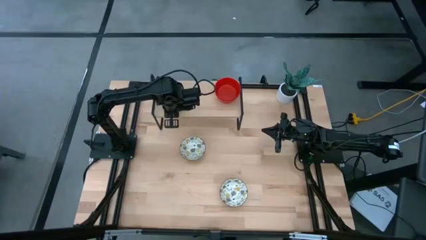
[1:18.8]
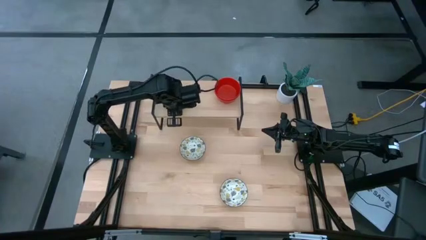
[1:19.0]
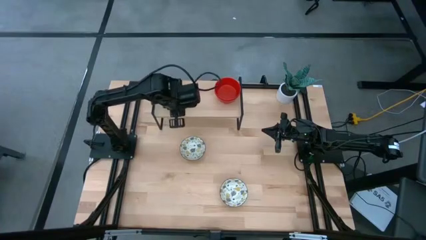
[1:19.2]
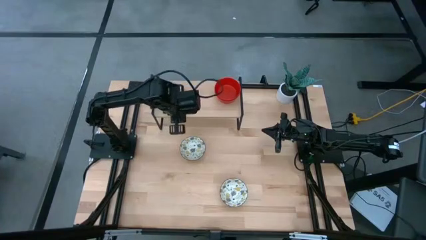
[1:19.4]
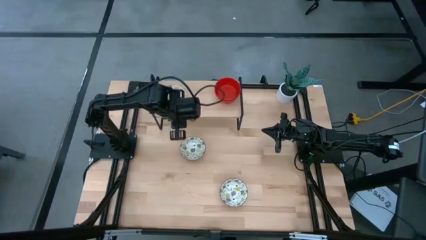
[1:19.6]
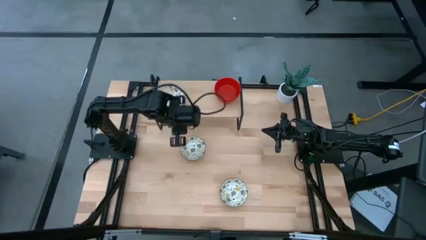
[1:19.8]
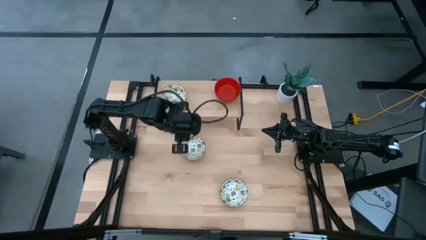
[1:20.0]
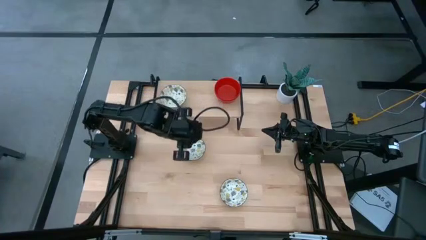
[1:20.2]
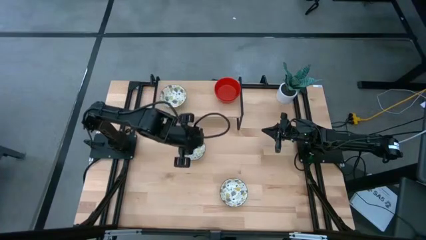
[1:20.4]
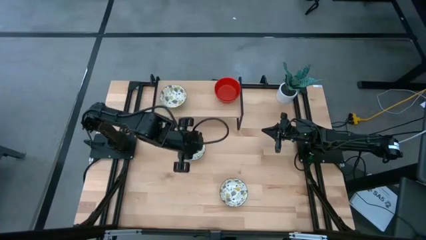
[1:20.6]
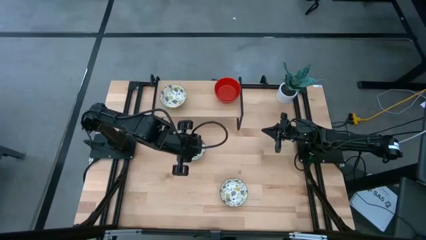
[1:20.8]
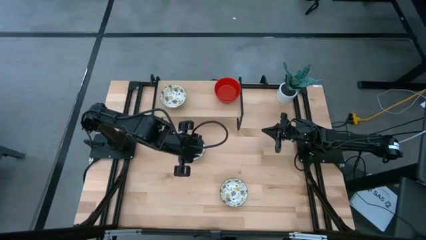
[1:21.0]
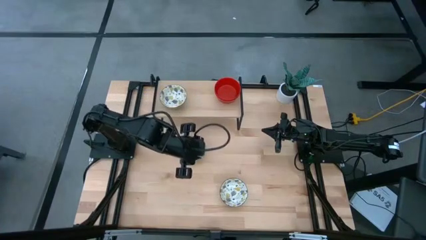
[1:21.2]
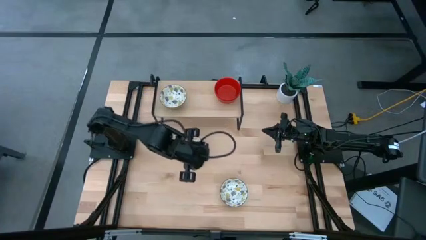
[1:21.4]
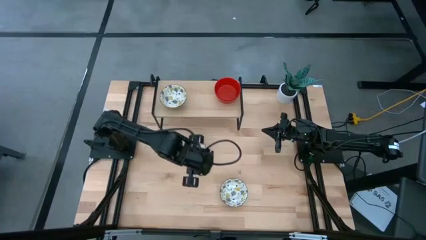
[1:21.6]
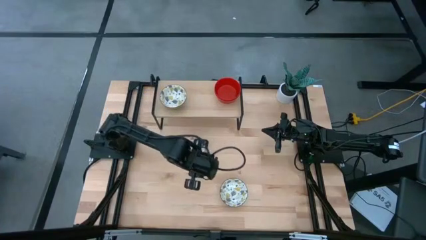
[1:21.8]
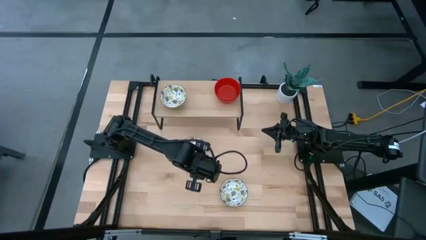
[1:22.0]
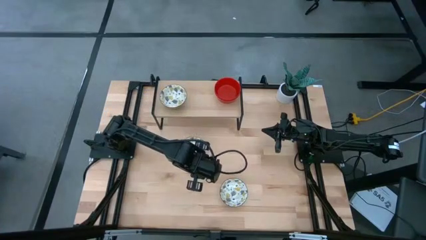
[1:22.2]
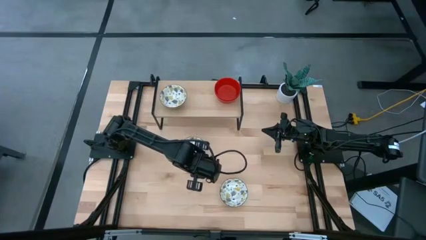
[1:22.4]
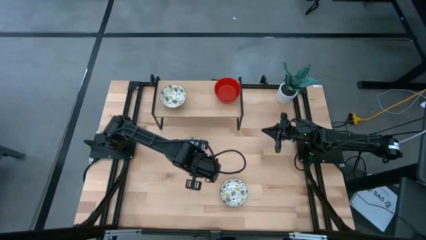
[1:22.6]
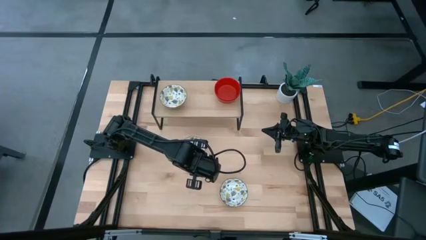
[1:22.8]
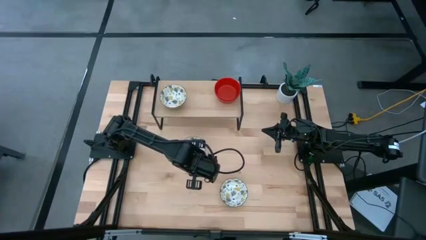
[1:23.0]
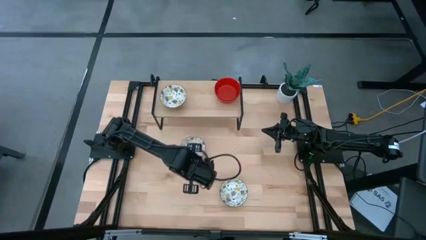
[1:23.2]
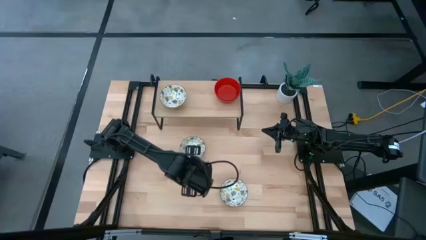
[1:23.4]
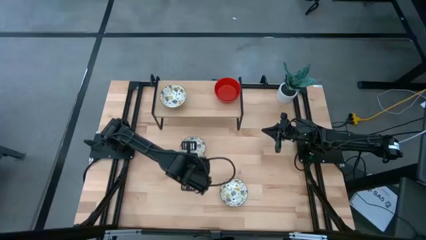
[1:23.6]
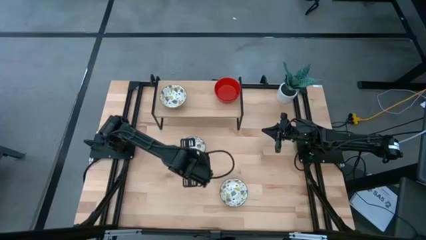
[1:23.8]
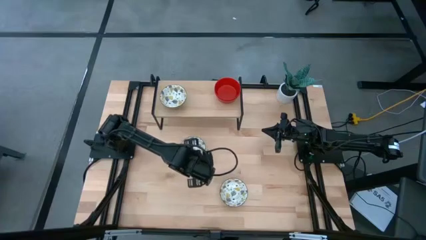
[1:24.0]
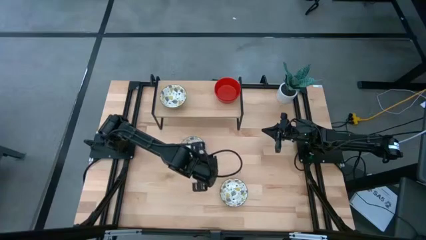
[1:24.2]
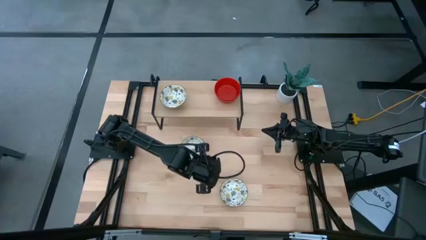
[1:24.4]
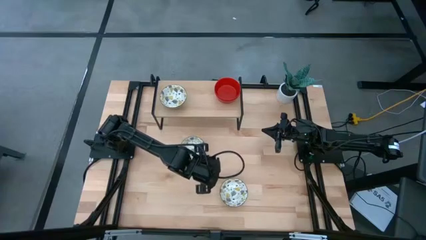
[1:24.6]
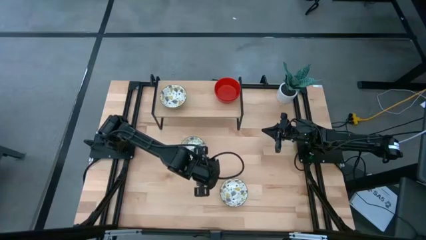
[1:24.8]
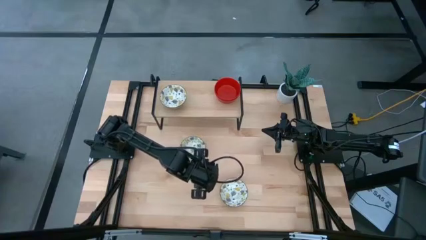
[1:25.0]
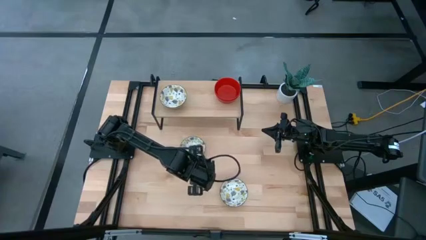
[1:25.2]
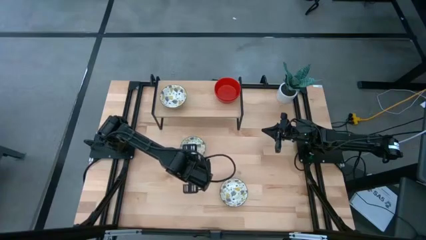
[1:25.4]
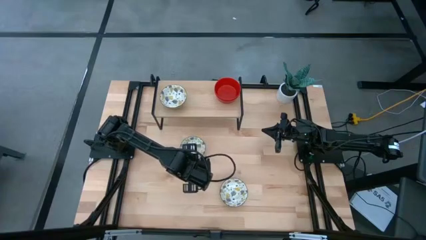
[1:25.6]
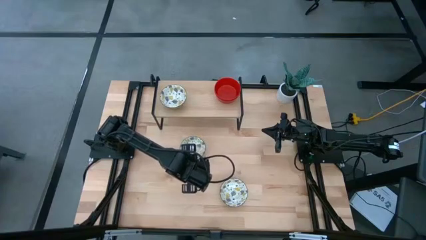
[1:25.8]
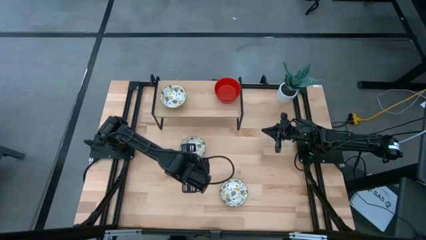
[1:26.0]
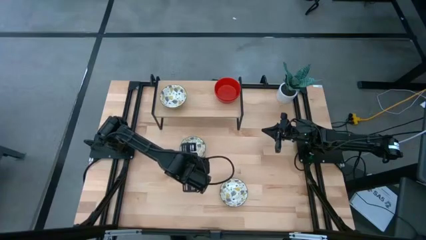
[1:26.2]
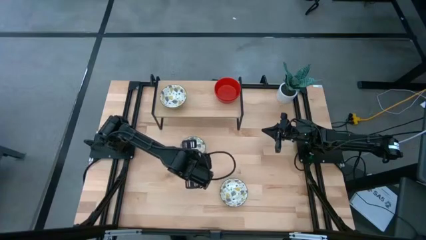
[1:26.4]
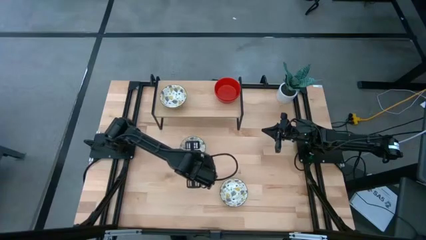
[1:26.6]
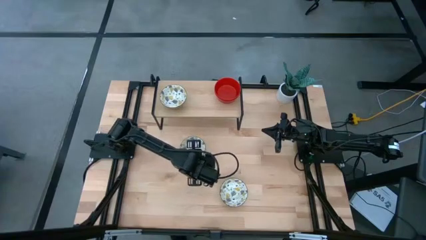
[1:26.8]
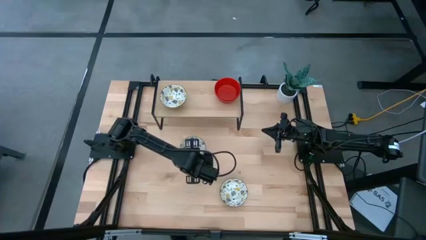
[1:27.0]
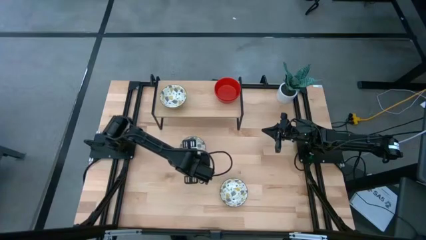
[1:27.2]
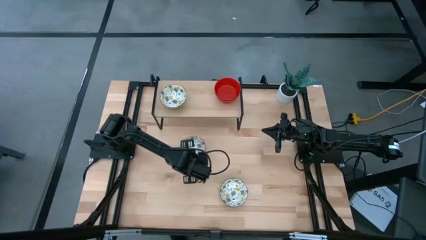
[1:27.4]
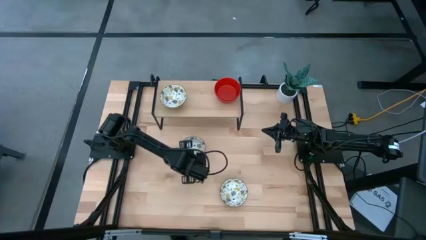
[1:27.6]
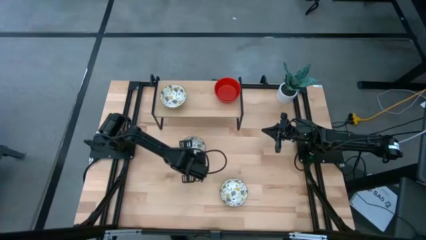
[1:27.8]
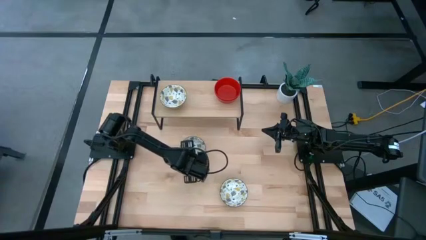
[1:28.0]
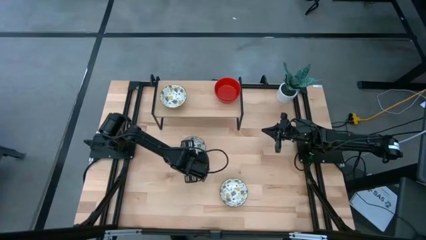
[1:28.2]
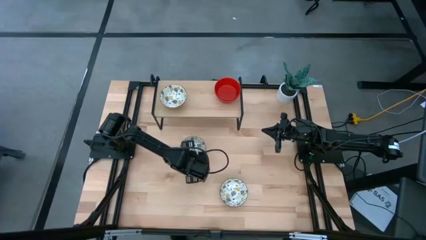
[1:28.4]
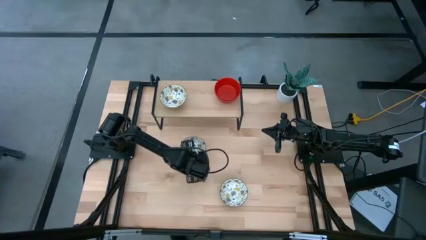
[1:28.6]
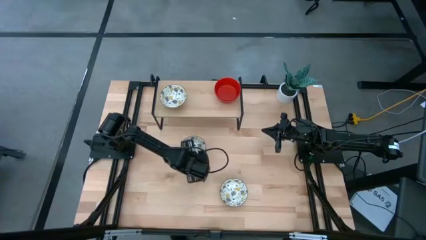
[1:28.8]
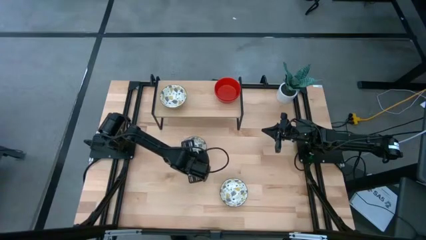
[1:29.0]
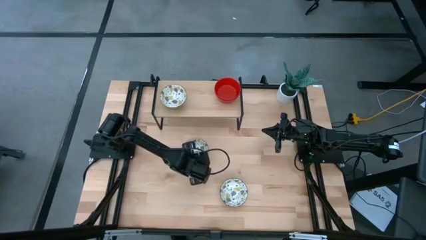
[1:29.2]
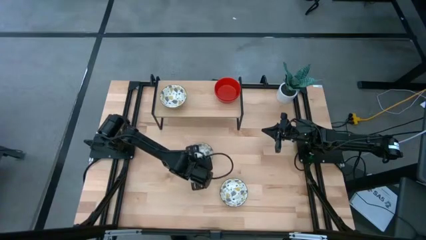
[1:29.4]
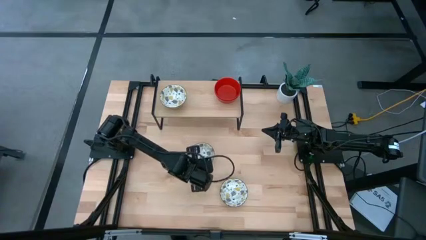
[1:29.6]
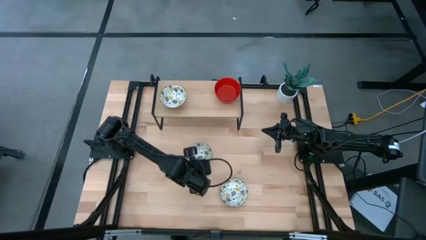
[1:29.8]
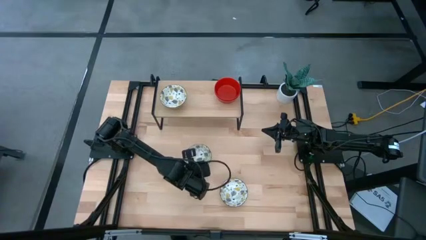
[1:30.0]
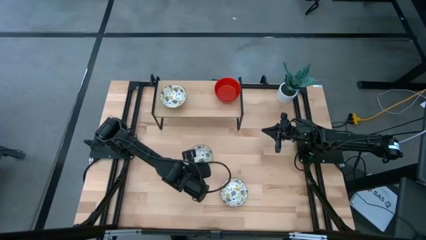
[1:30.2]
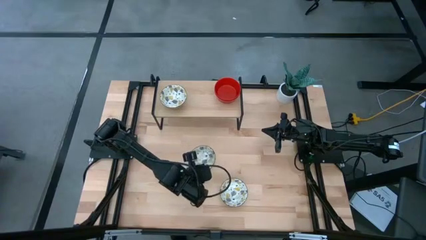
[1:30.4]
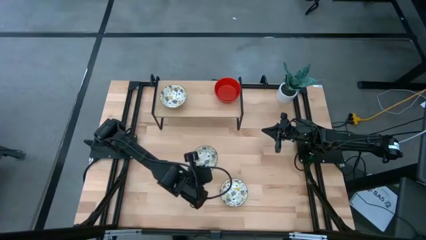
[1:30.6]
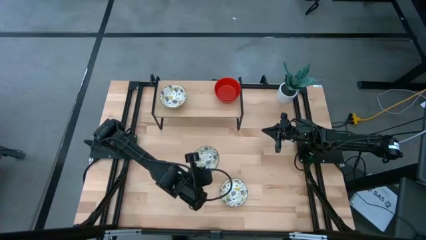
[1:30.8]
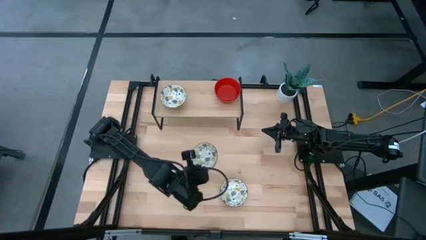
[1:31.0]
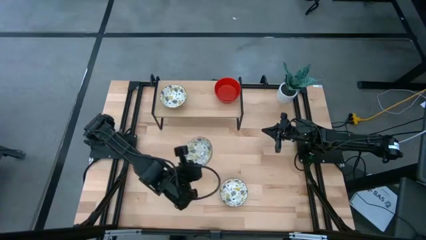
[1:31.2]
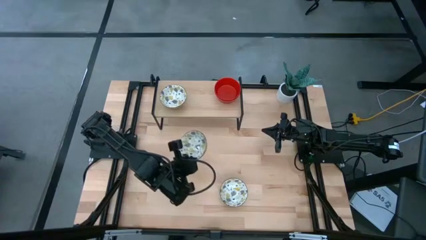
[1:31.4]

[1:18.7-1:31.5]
Task: Pick & Place Mini bowls
Stack the top yellow patterned bowl on the yellow patterned bowl on the shelf
